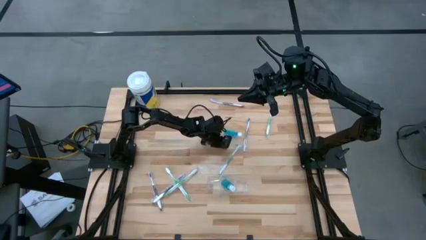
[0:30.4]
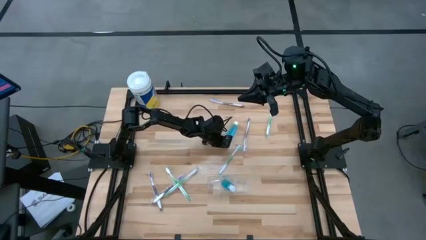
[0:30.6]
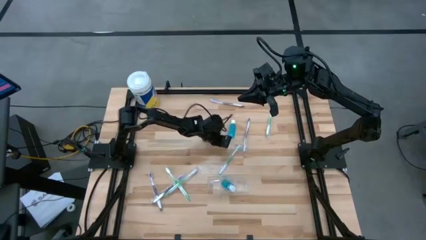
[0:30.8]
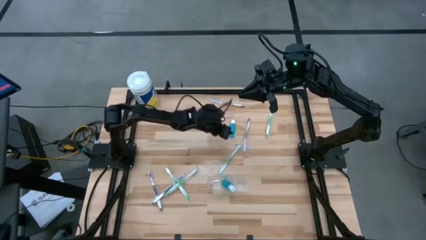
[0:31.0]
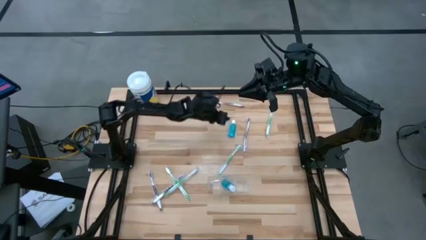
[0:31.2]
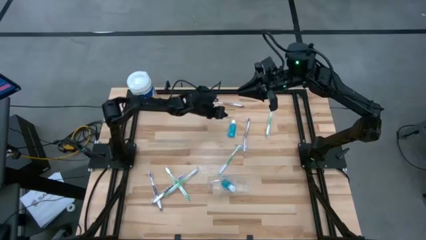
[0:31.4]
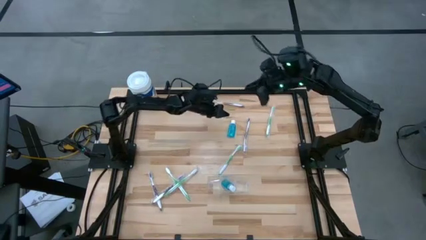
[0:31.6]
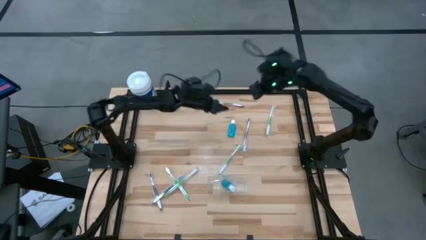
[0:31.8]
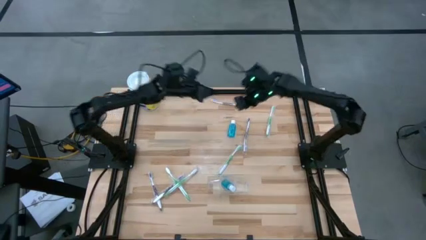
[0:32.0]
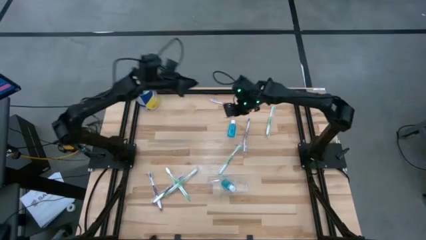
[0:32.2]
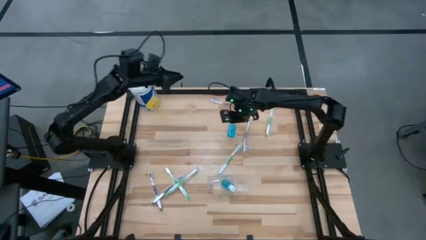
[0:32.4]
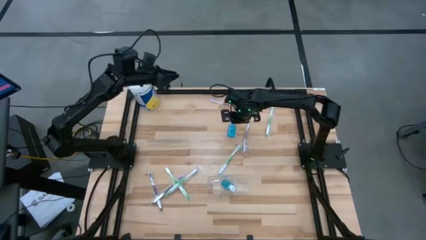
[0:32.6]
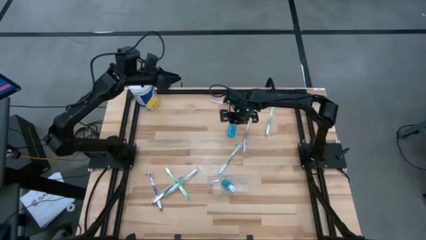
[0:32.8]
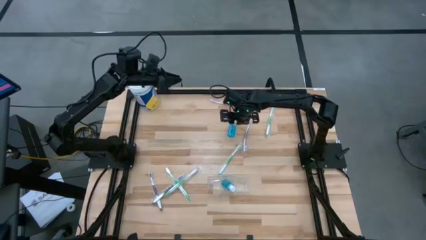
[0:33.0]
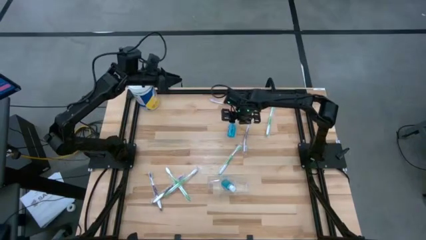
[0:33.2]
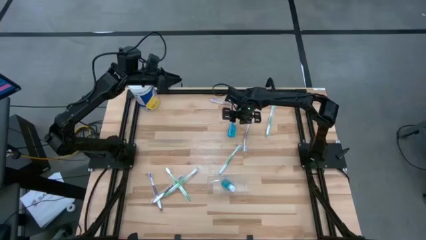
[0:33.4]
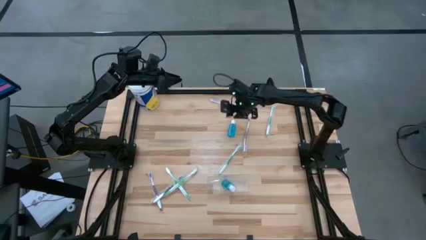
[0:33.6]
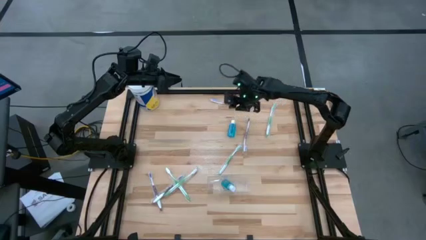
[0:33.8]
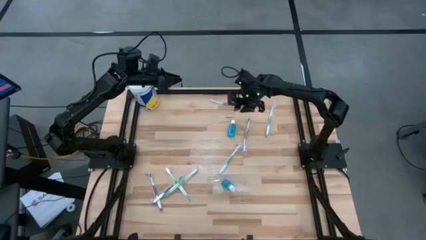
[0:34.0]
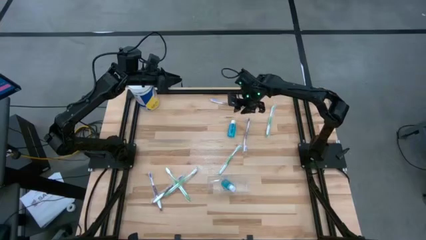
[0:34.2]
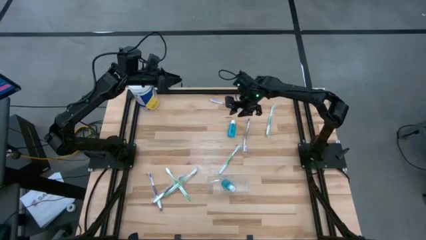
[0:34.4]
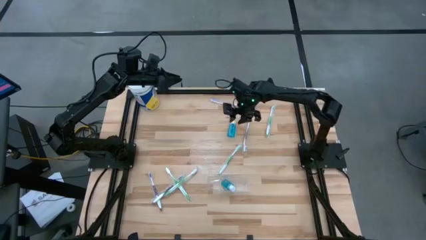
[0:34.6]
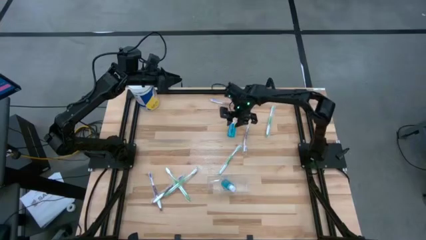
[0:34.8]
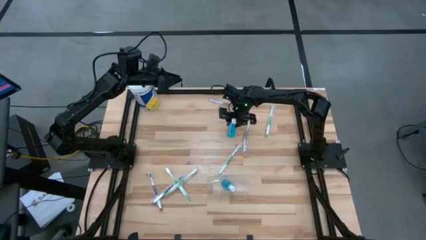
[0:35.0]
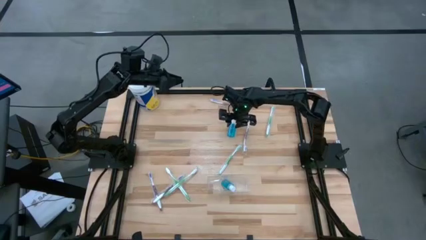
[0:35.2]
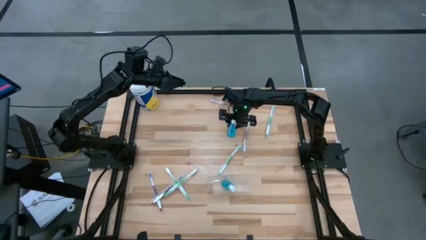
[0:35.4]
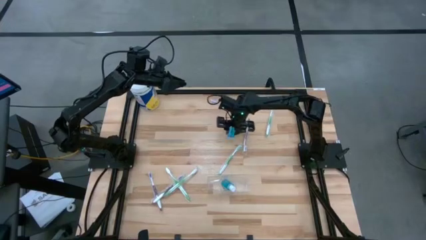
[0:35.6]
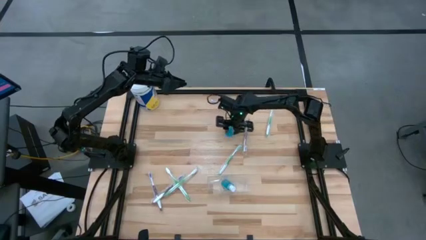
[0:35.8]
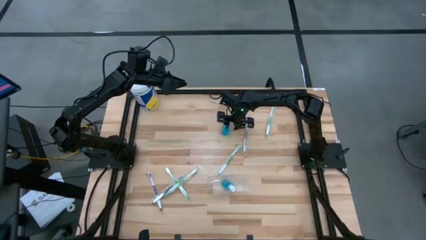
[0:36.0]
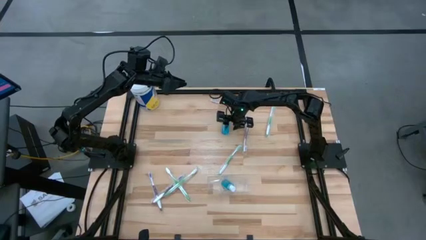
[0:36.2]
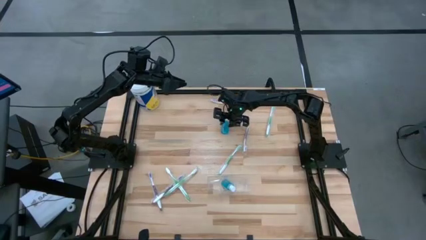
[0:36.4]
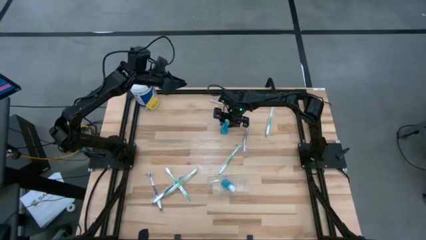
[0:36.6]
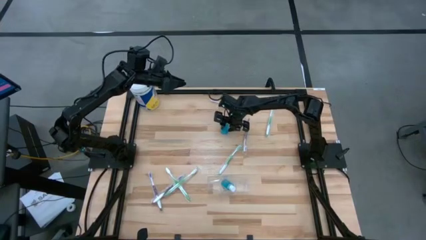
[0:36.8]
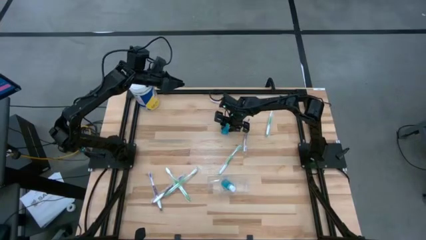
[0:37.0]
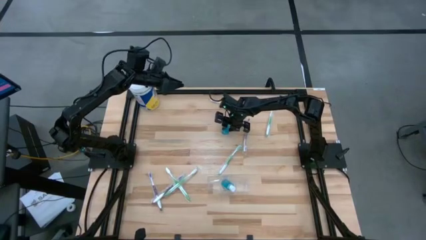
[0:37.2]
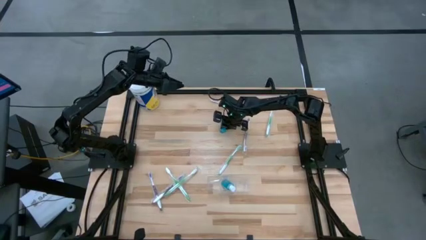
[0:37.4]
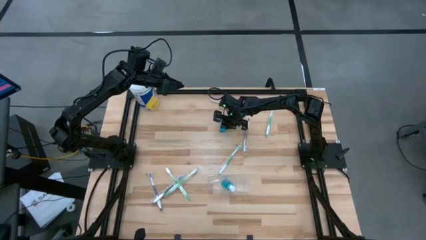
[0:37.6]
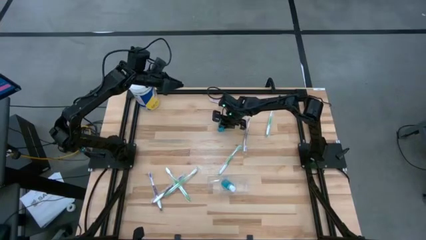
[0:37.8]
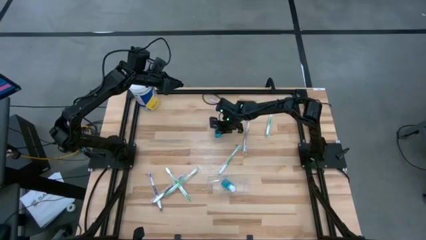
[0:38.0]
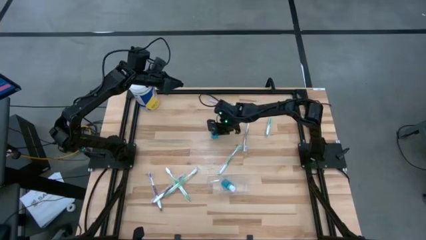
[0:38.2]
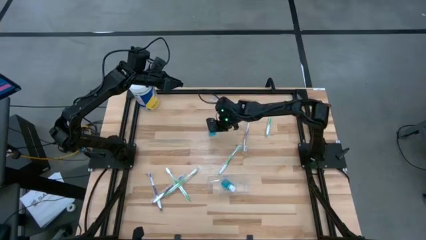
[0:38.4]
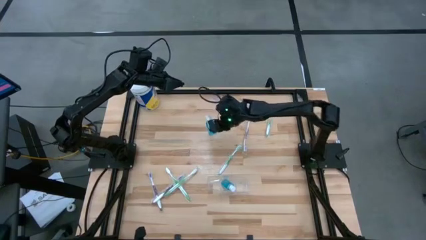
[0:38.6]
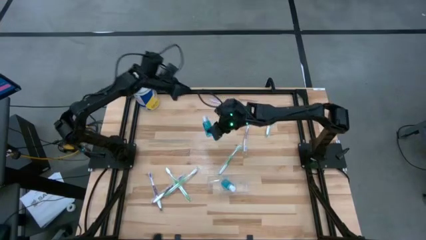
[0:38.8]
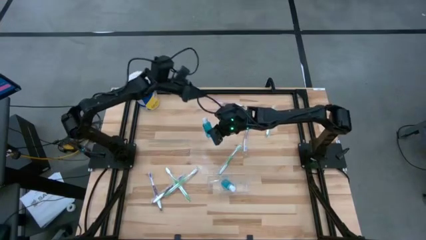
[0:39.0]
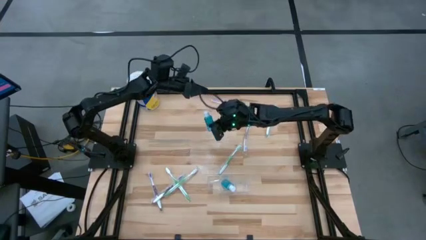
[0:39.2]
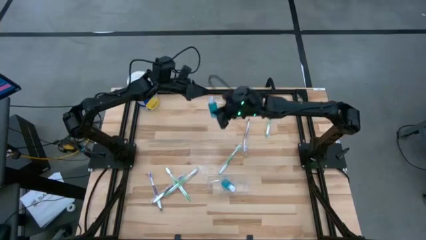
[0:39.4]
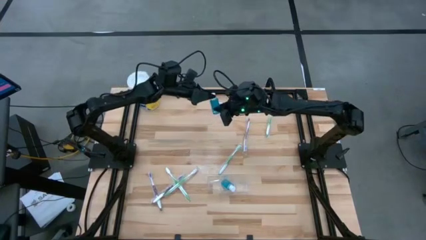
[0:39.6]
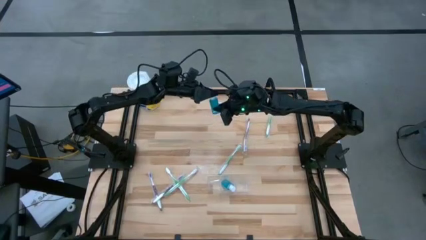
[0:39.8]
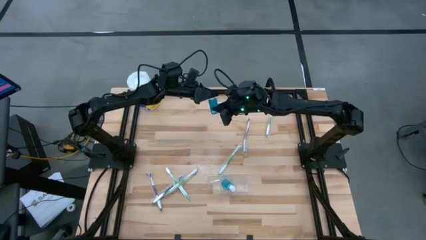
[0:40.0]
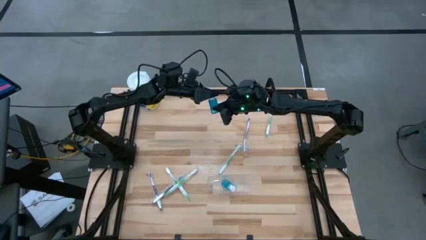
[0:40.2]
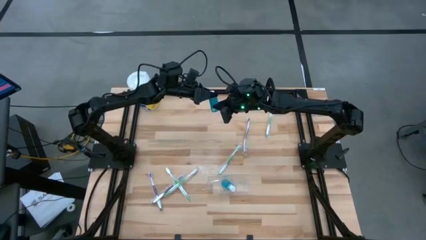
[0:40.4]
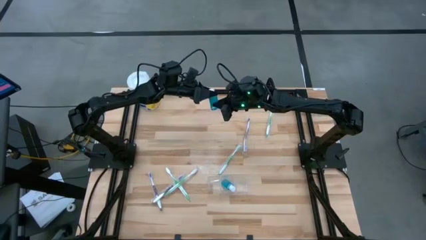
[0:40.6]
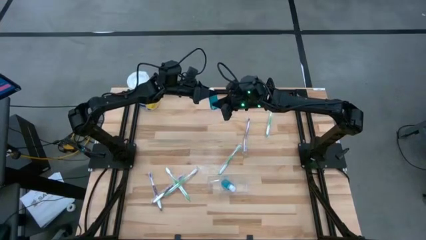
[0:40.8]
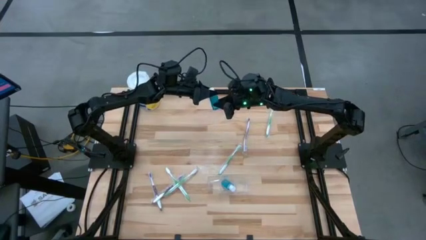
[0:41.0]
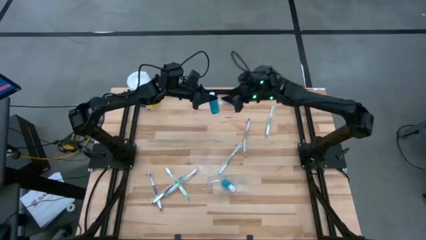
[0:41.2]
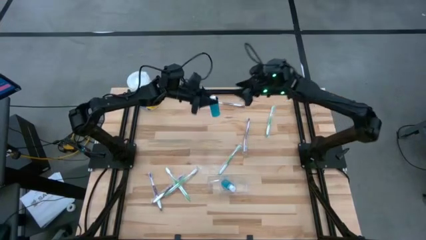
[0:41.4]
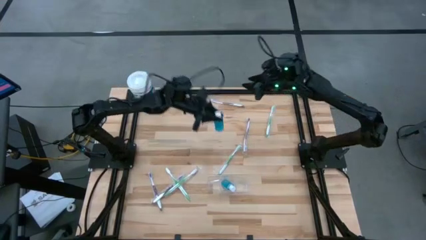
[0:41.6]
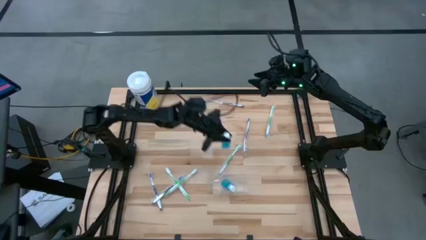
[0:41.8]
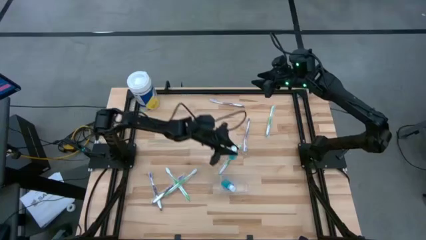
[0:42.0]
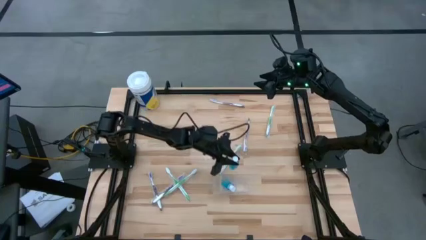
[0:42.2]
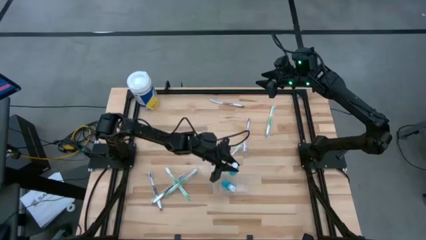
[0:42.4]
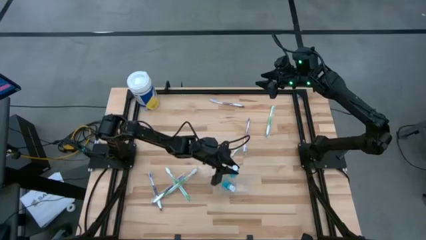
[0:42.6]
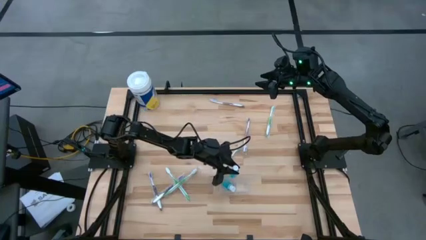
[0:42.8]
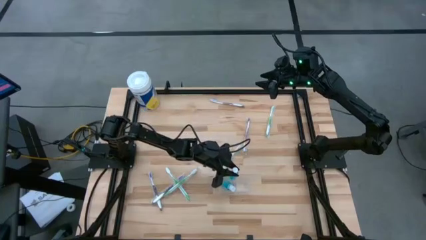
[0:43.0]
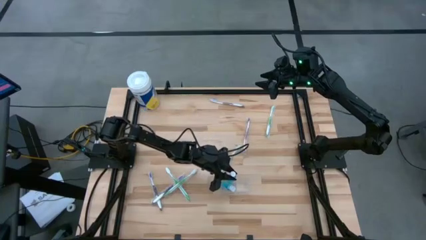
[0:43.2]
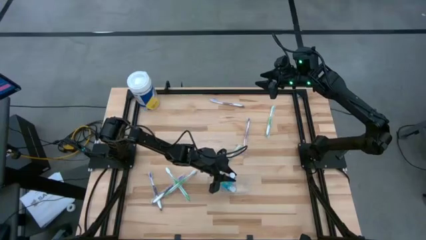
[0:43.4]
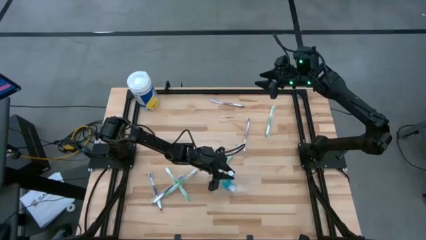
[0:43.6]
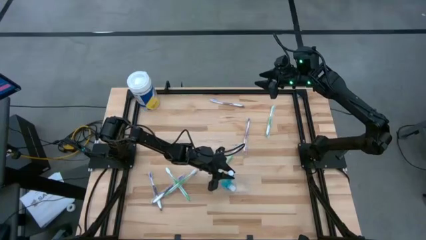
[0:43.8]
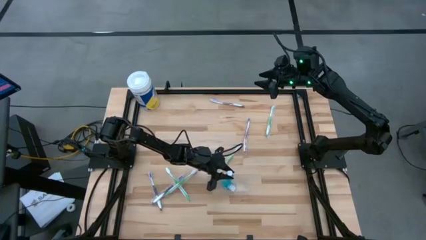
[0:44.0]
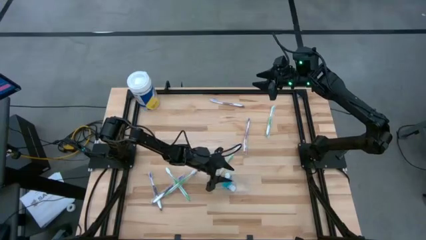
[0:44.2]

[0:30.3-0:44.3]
Task: Pick & Place toothbrushing station
Put the blue mouthwash bottle in the transparent organizer

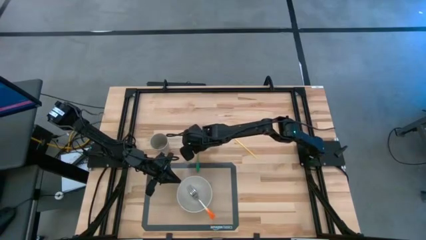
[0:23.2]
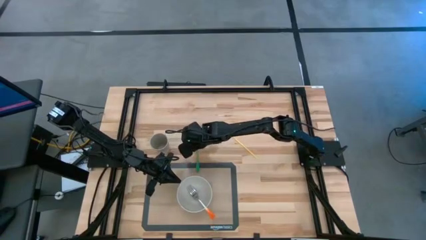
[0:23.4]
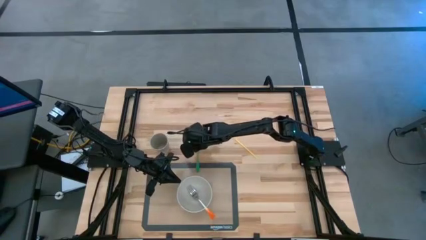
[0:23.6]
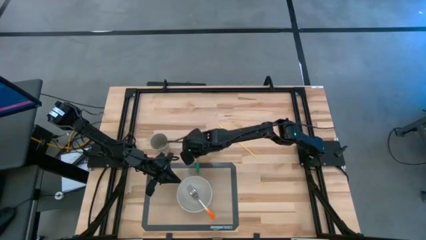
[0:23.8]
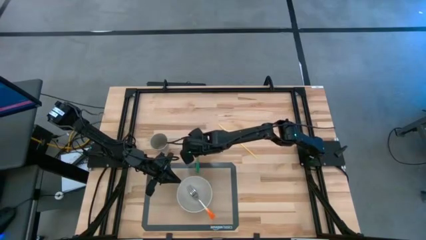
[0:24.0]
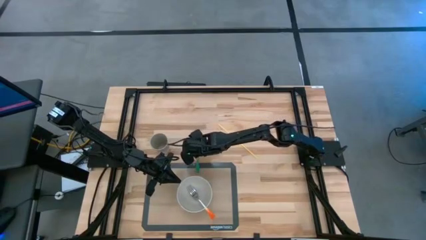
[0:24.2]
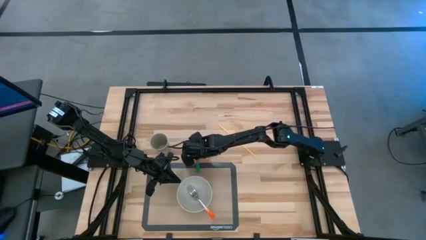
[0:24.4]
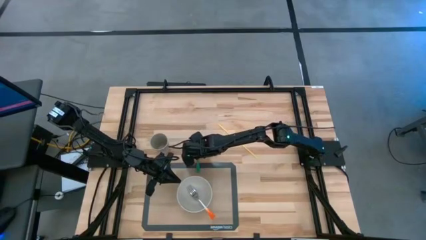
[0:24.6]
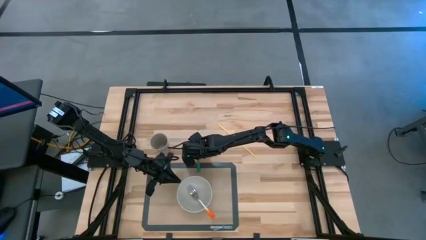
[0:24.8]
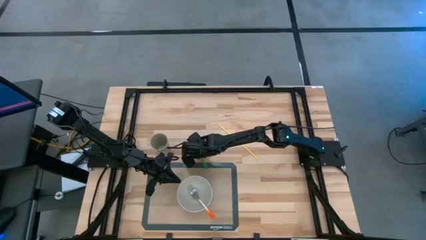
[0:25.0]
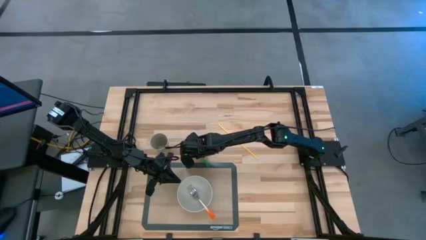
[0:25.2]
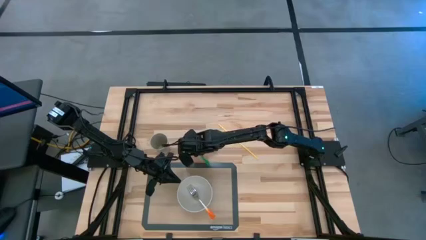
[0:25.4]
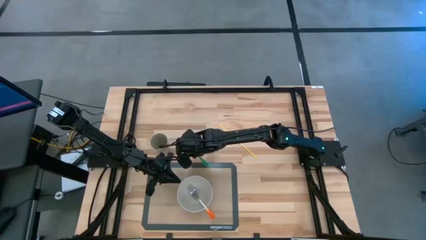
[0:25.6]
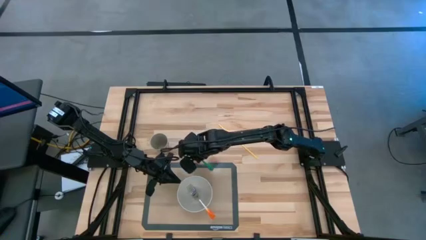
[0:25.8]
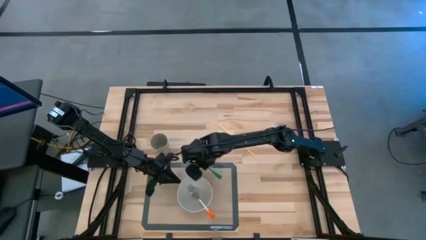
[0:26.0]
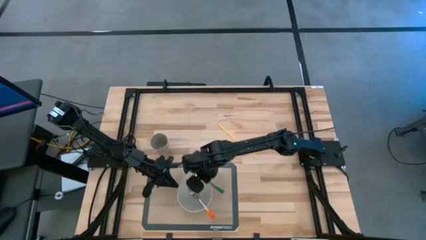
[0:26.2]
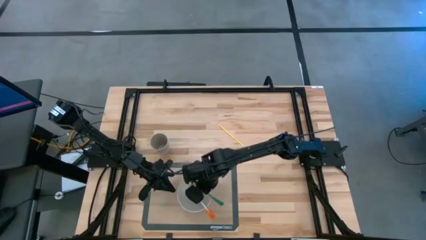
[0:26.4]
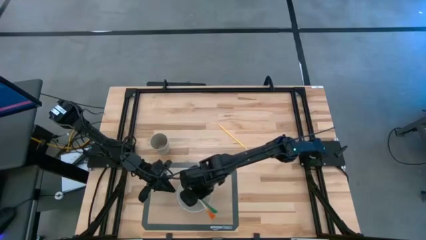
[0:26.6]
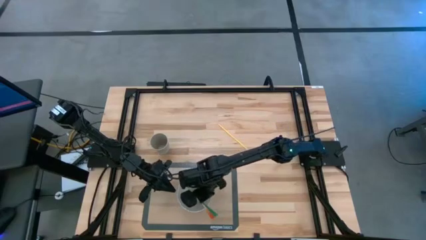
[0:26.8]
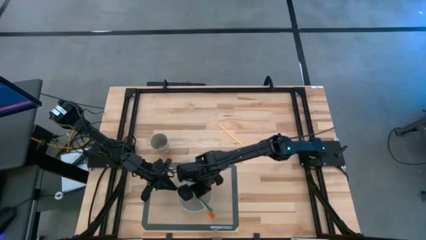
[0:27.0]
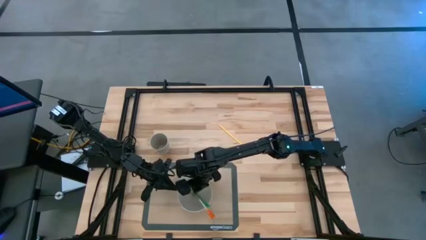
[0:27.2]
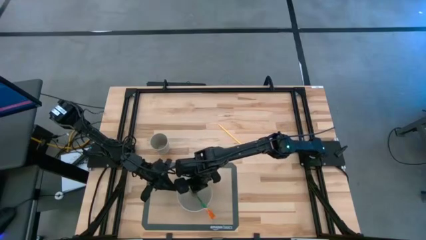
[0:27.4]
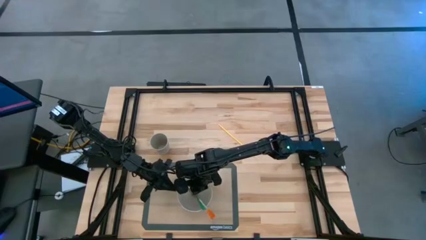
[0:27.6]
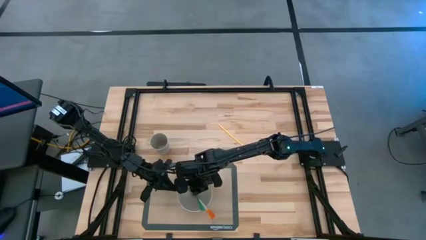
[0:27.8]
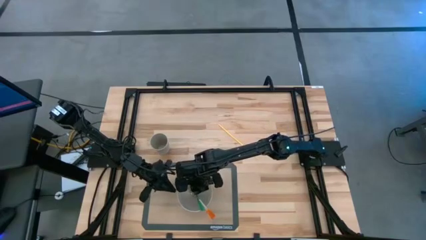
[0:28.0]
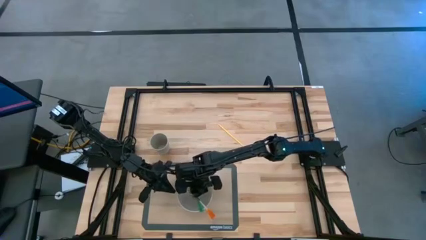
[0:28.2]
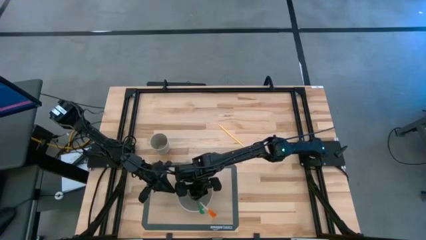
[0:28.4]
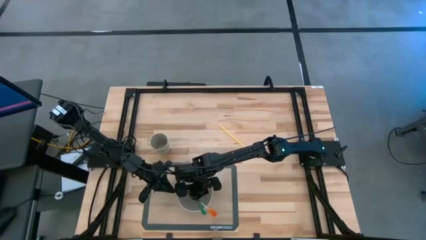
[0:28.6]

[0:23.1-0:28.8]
Task: Pick & Place Utensil
Put the green spoon into the white bowl
